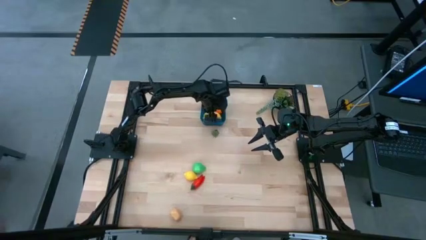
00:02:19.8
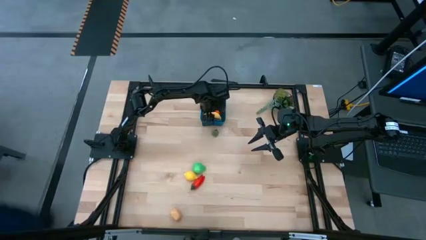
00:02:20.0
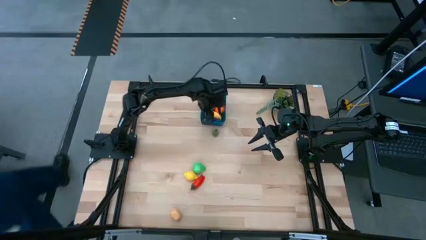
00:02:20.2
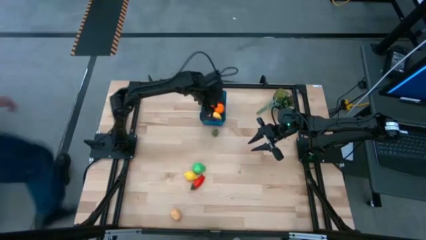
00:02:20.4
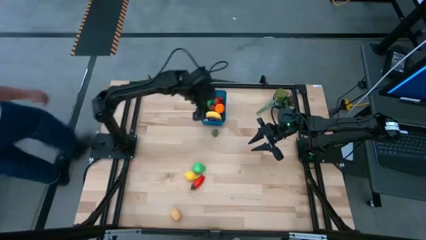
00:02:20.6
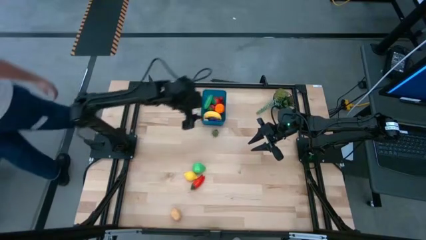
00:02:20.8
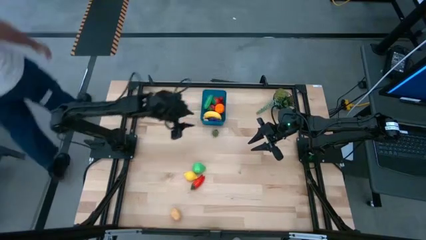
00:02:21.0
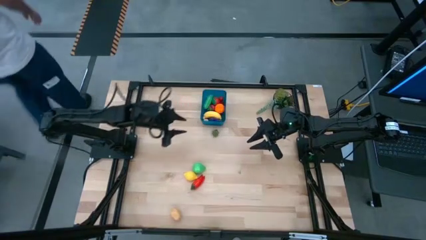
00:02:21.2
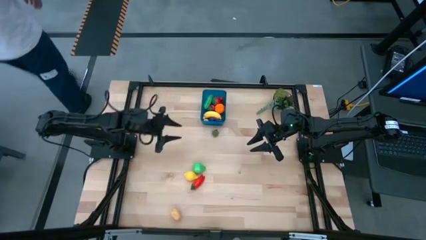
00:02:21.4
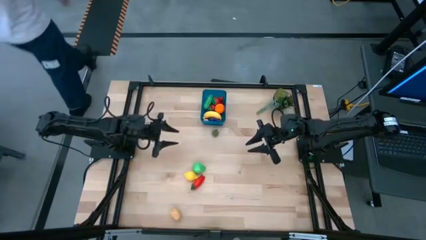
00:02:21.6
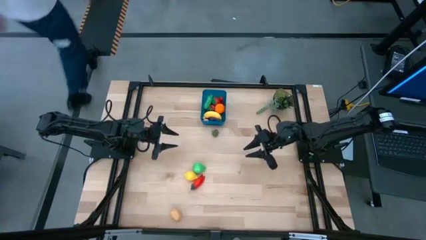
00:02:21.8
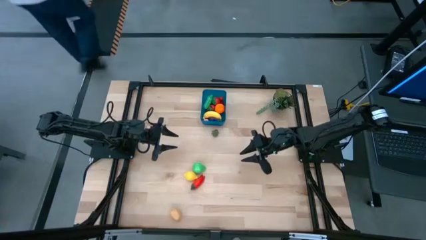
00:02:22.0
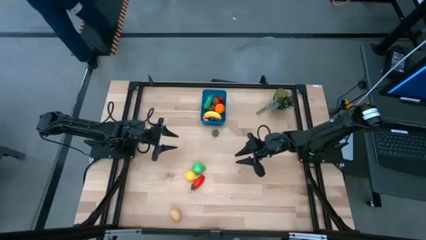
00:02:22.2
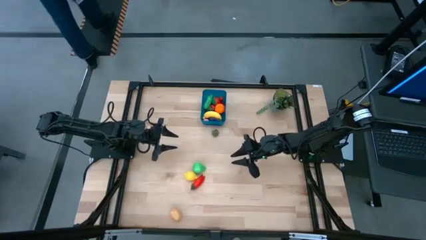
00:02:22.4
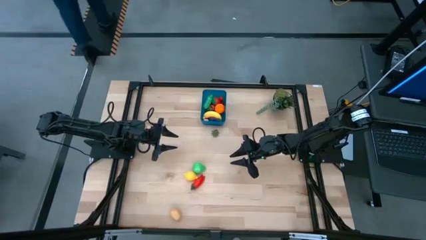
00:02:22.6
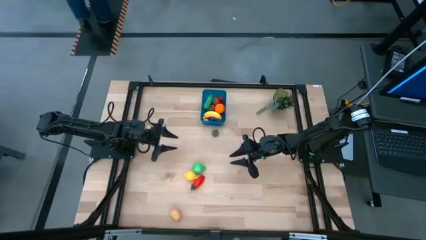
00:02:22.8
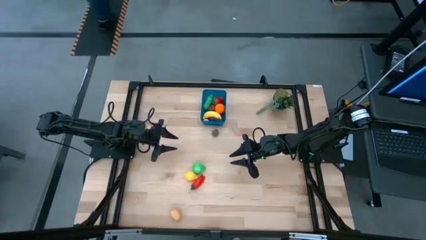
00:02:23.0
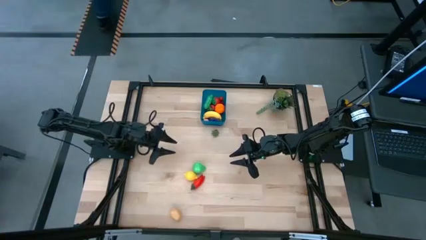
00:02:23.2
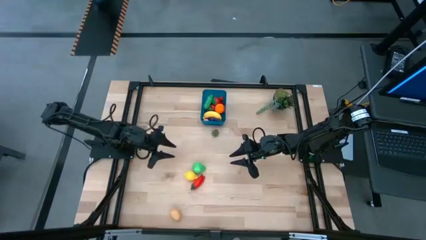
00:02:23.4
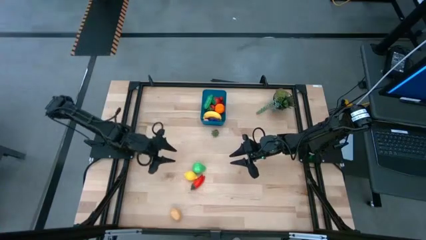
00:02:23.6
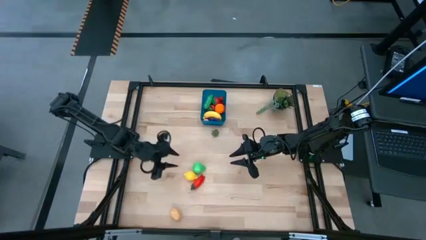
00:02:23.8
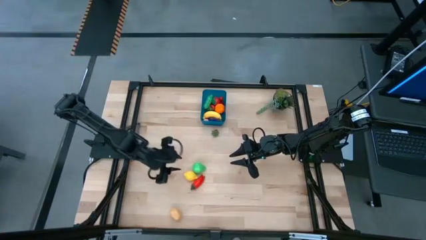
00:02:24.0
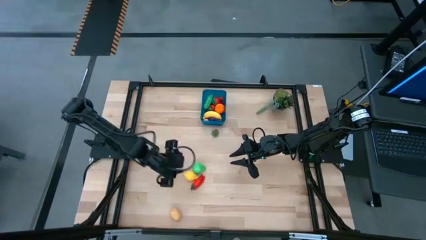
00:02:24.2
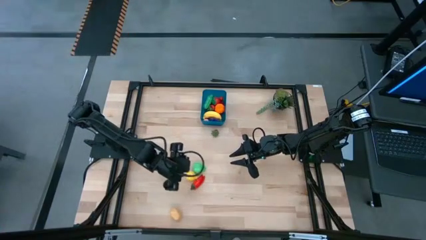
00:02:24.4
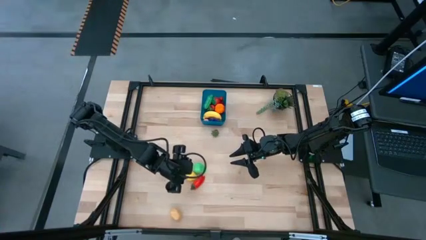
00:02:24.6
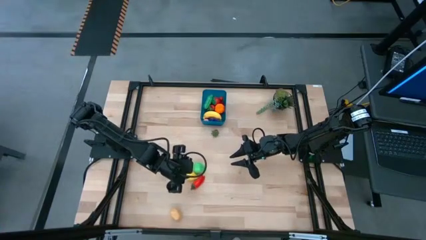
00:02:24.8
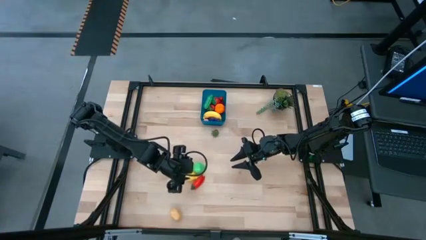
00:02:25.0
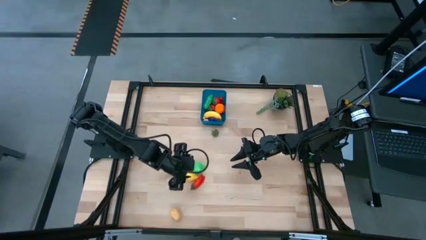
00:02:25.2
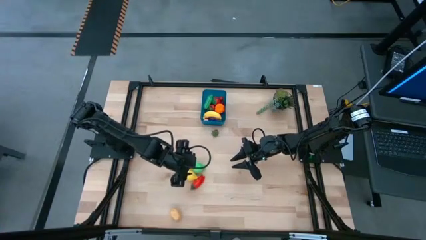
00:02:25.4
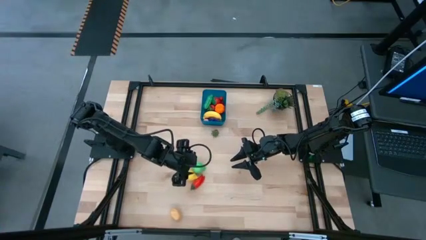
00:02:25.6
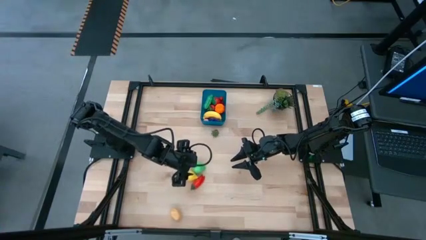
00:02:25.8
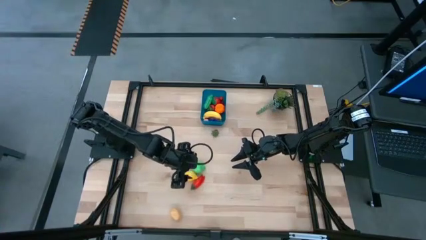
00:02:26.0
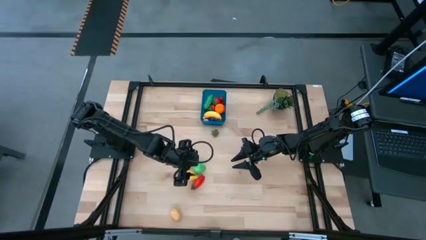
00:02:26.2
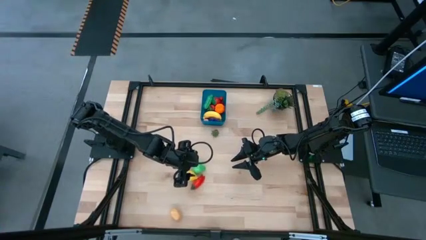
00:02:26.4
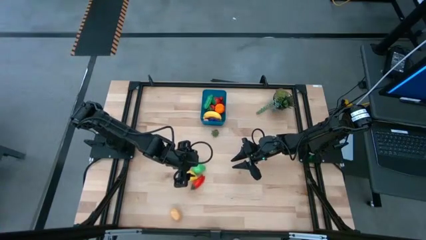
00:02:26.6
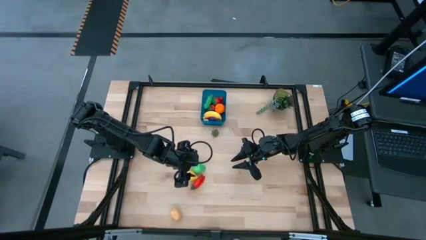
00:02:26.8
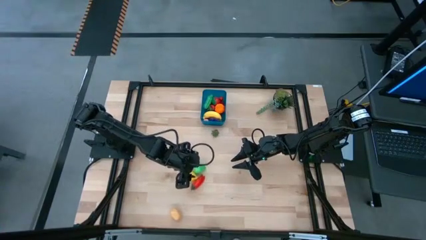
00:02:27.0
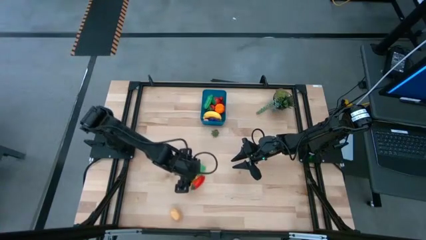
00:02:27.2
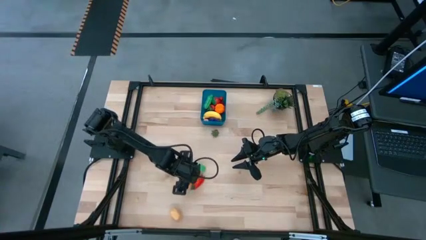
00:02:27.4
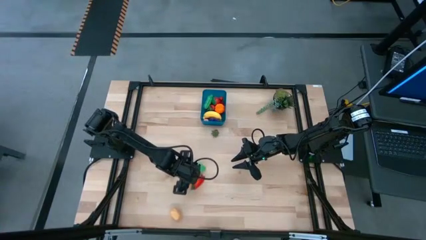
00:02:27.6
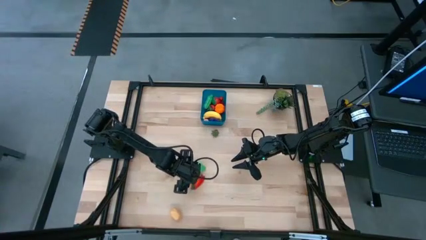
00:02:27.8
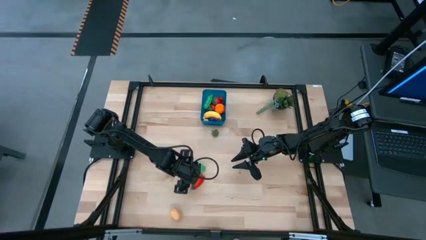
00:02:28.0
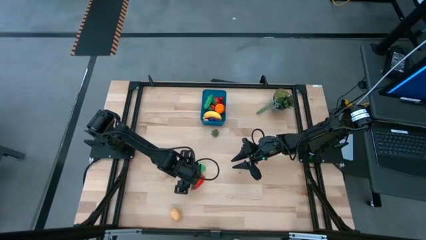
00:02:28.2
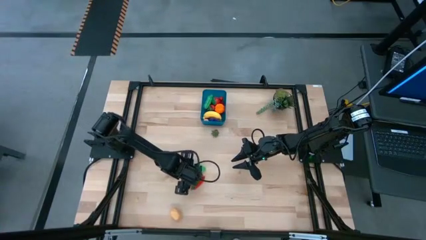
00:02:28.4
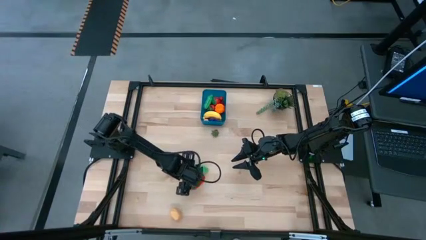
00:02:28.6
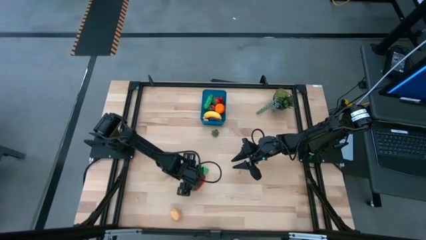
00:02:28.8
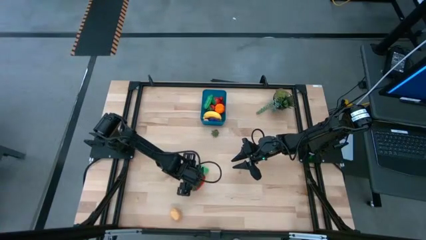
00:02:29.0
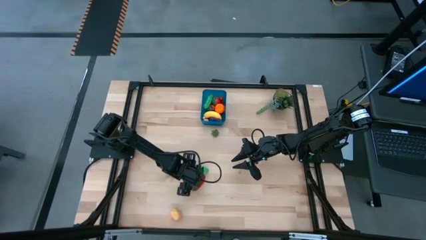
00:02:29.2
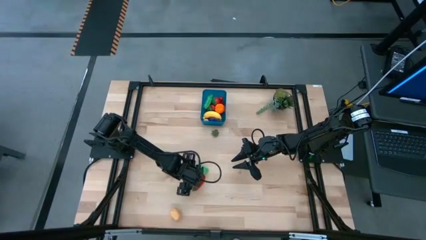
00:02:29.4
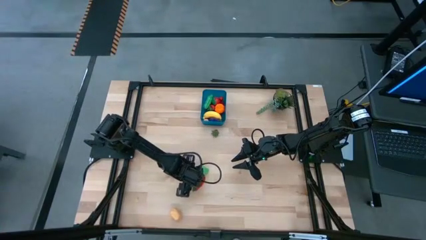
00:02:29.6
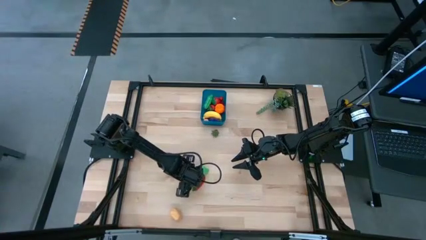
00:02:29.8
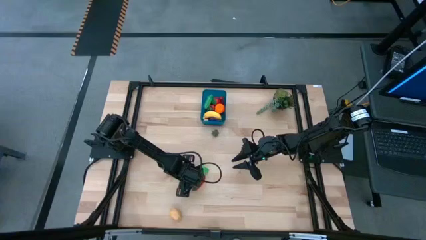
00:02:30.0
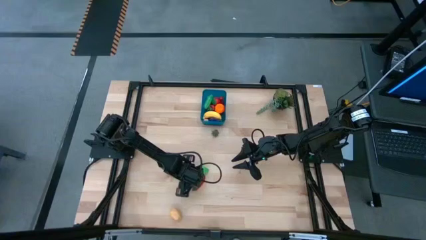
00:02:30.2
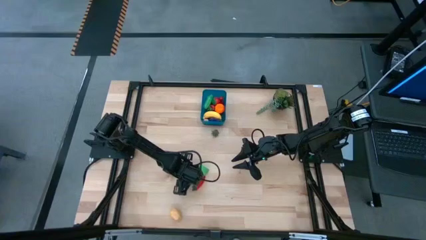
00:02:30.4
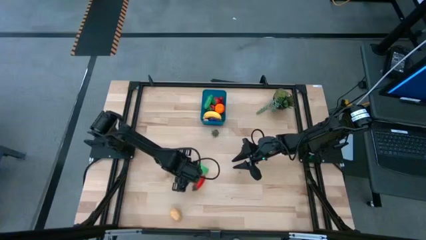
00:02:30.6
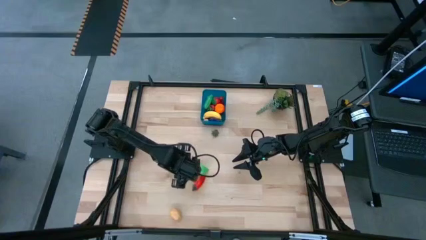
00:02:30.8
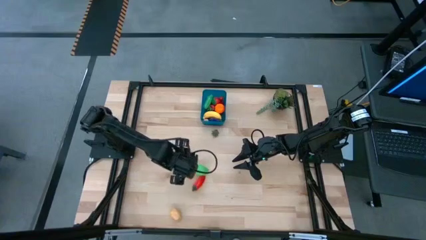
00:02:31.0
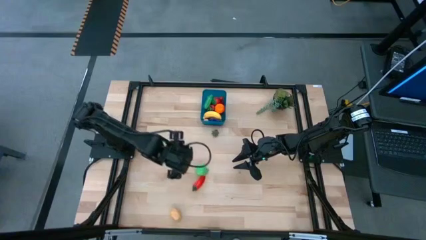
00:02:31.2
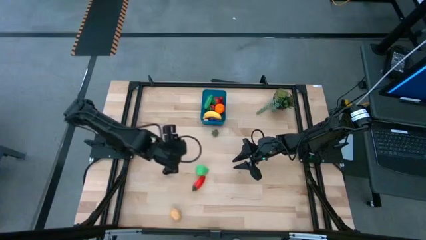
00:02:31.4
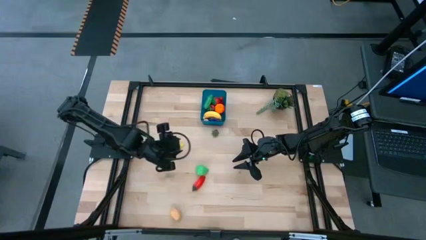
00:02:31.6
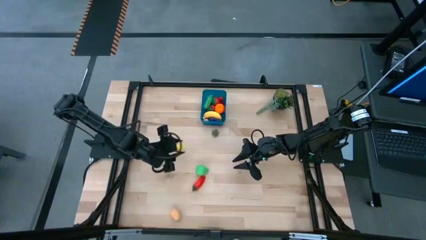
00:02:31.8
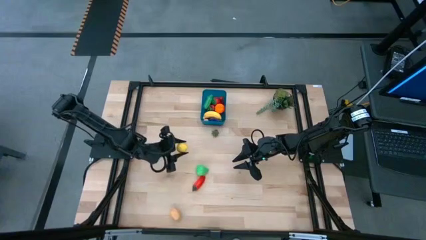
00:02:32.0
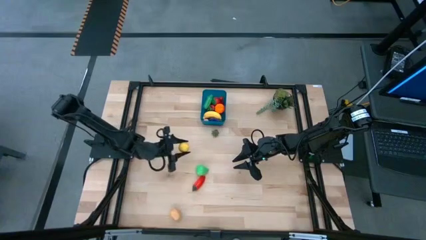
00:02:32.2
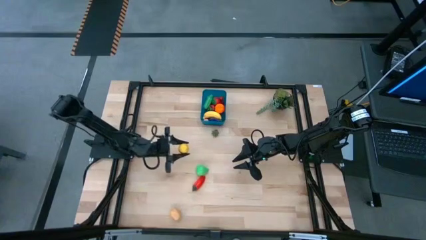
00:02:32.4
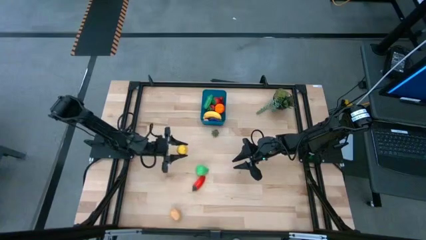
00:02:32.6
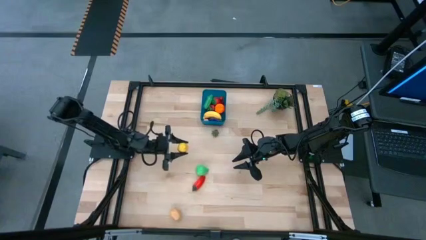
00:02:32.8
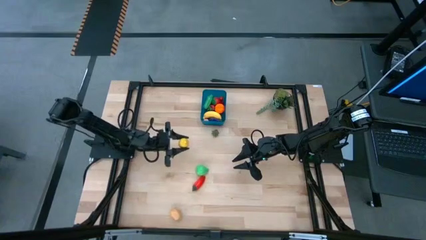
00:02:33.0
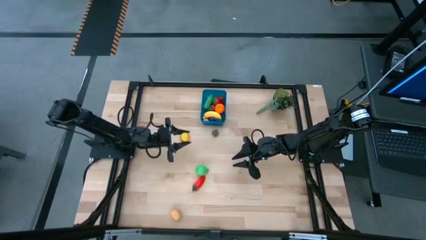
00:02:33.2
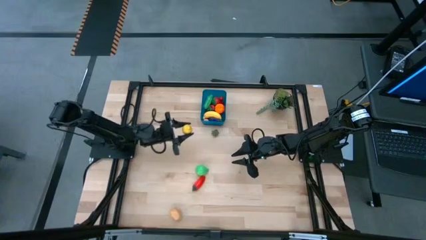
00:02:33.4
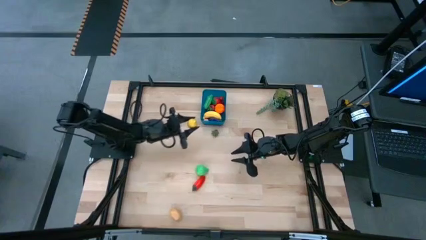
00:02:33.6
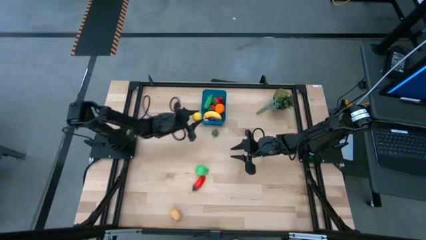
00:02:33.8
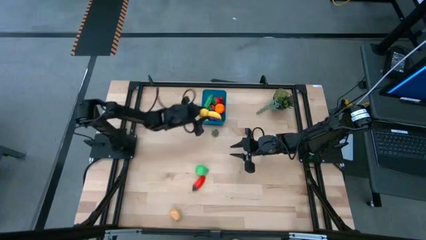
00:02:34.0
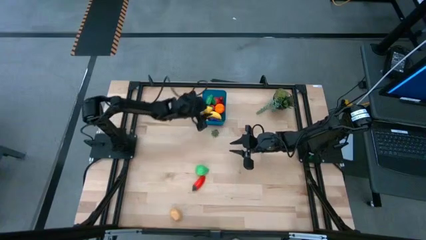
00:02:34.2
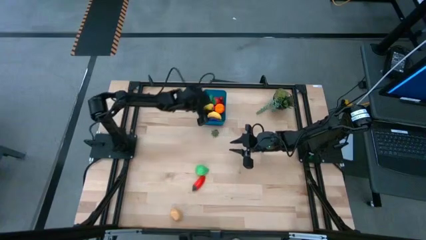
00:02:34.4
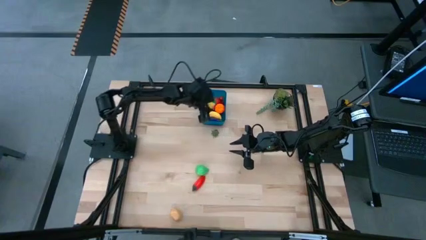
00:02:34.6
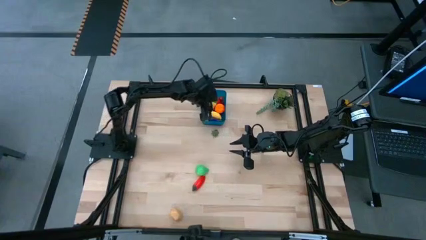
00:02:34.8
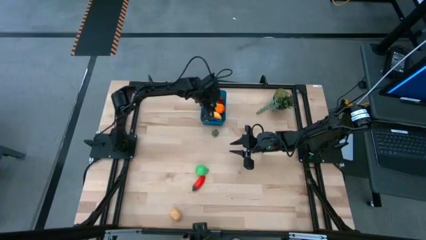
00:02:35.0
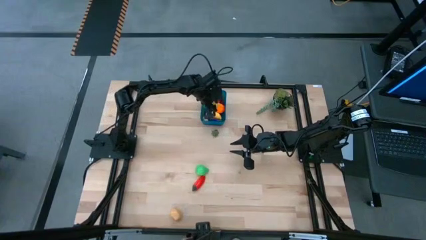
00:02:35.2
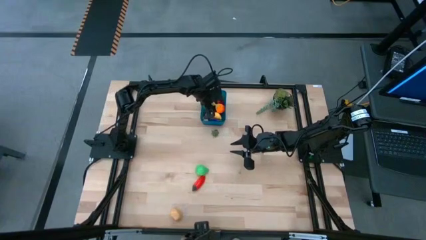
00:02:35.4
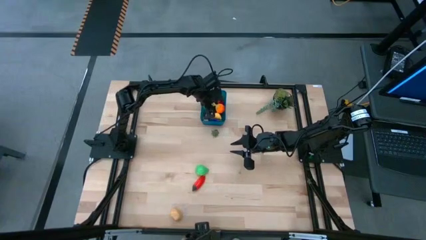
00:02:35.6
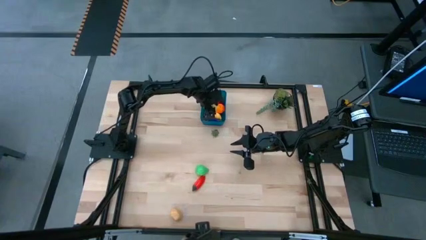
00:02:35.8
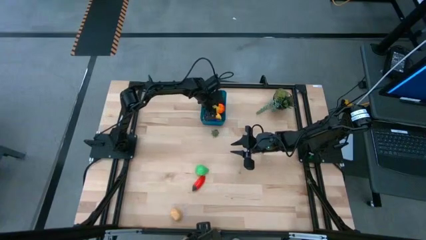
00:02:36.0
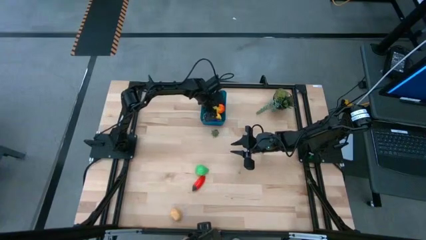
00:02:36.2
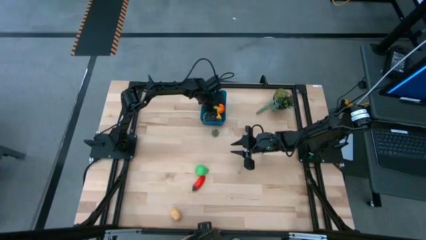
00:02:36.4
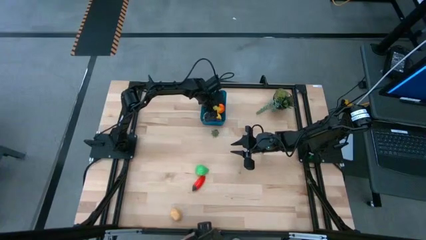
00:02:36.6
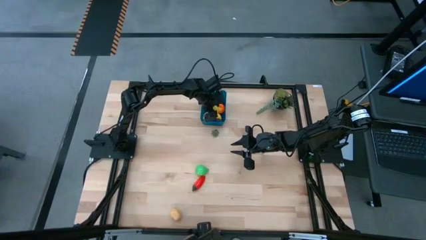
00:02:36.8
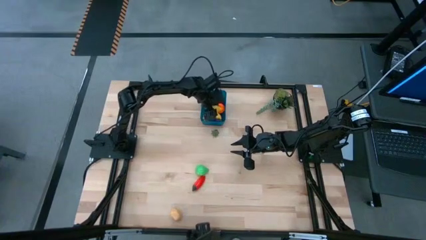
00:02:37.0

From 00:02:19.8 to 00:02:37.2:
Task: Pick and placing Produce into tupperware
Put the lemon into the blue bin
